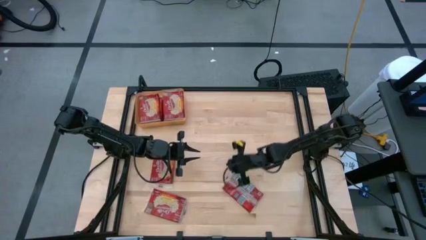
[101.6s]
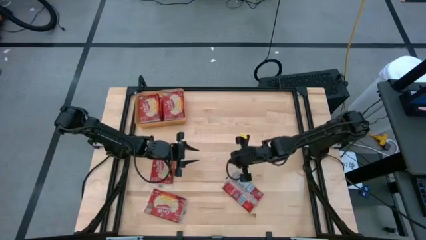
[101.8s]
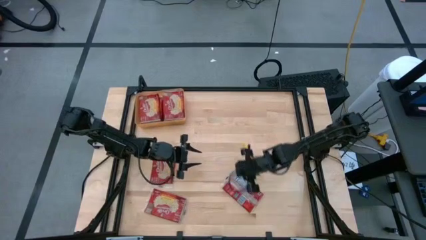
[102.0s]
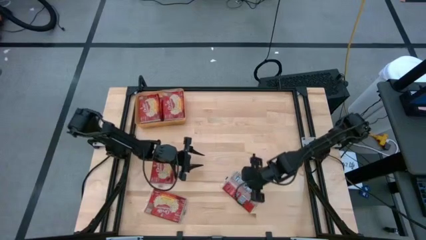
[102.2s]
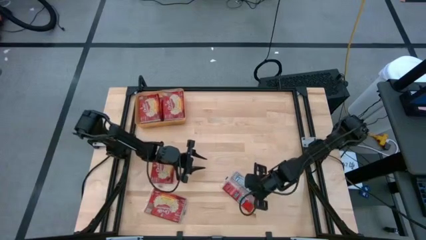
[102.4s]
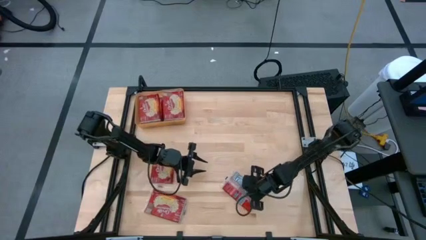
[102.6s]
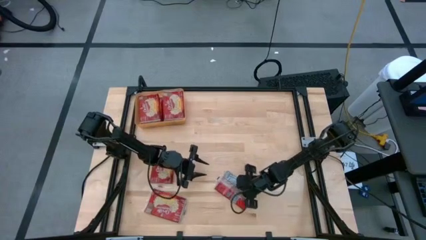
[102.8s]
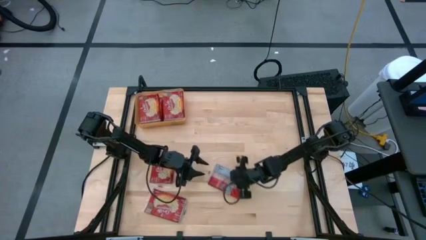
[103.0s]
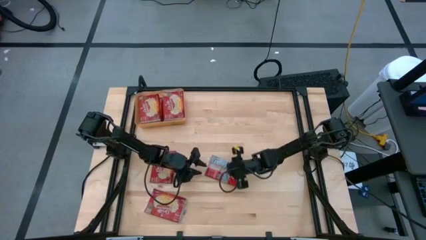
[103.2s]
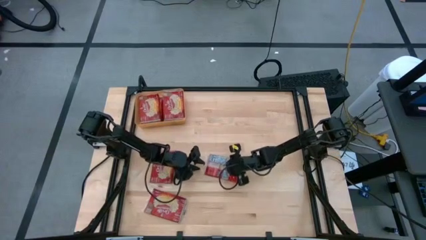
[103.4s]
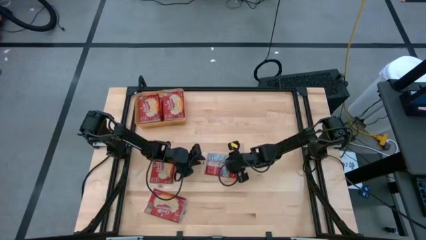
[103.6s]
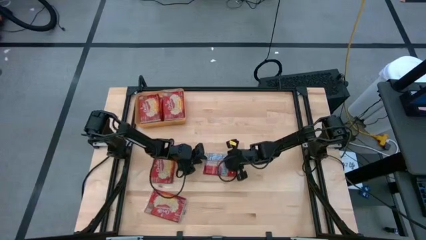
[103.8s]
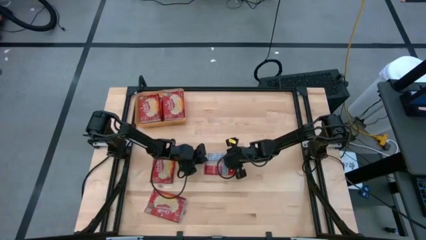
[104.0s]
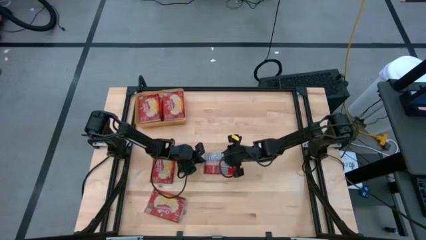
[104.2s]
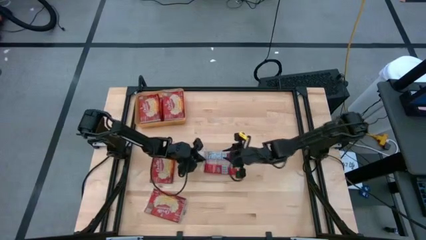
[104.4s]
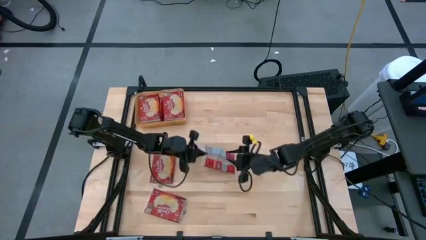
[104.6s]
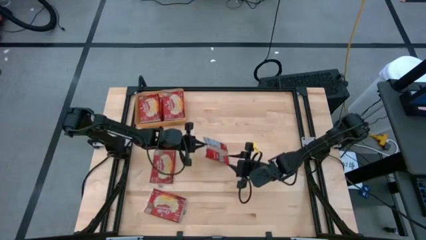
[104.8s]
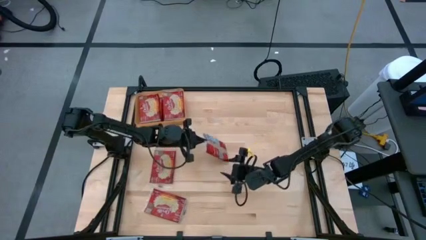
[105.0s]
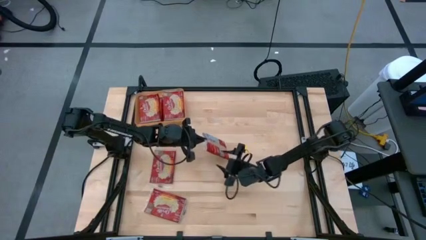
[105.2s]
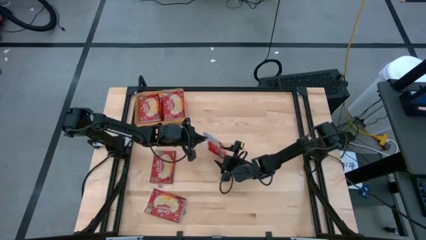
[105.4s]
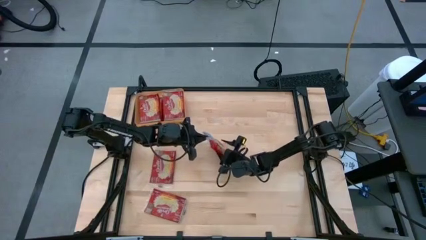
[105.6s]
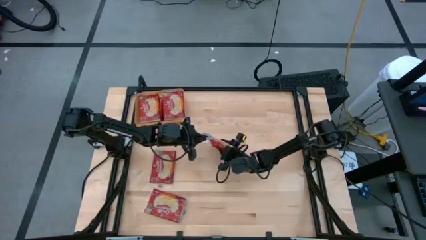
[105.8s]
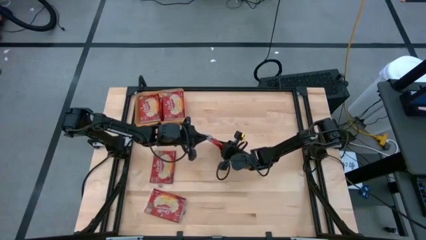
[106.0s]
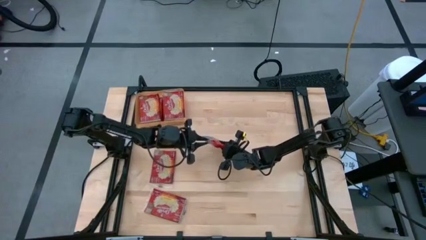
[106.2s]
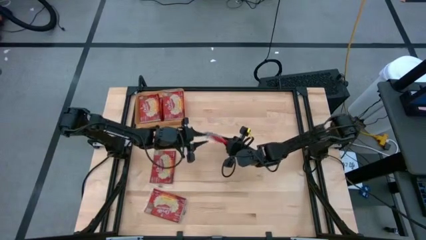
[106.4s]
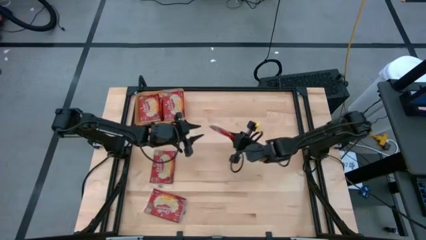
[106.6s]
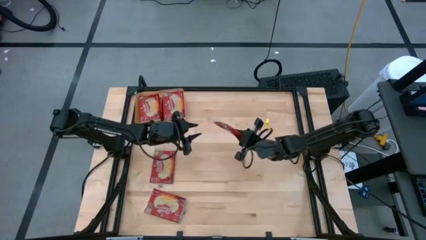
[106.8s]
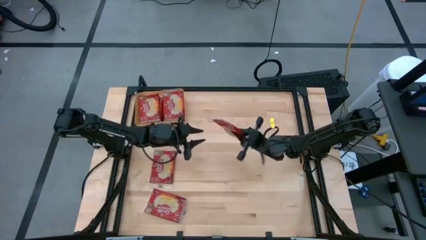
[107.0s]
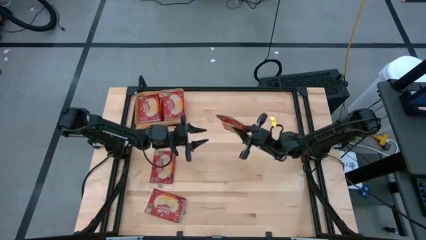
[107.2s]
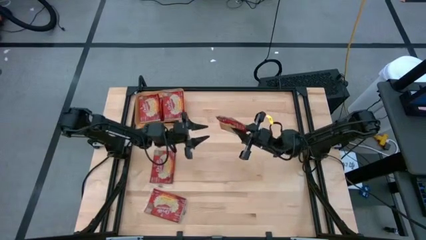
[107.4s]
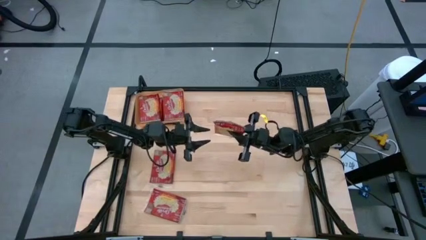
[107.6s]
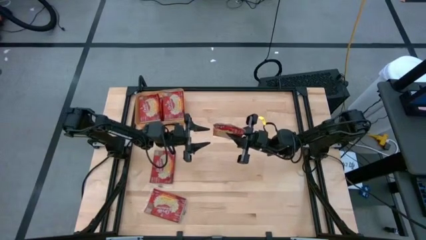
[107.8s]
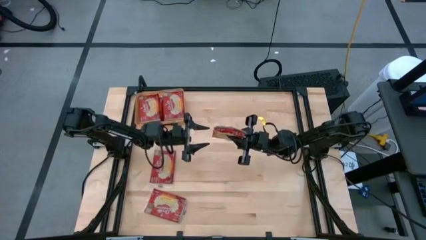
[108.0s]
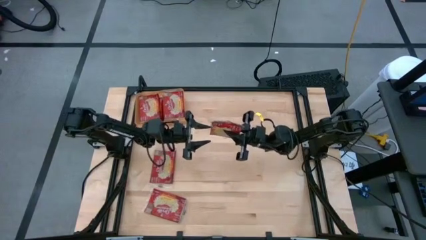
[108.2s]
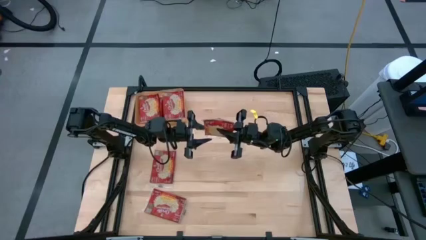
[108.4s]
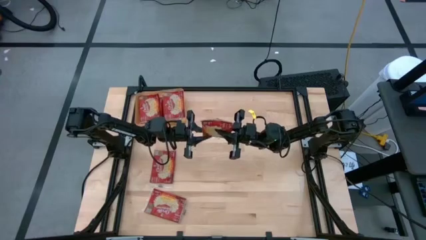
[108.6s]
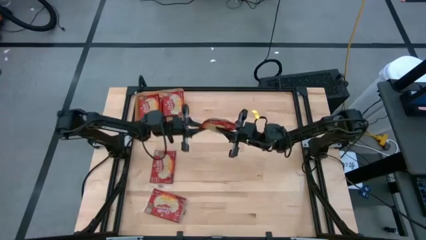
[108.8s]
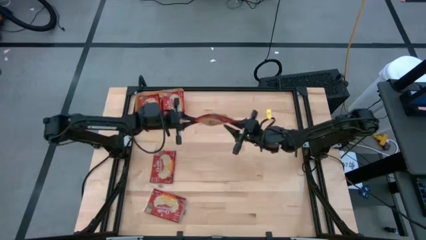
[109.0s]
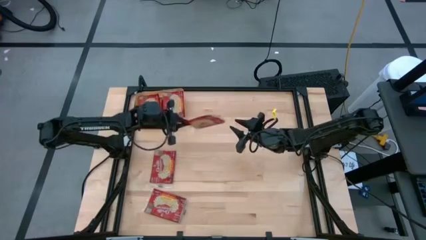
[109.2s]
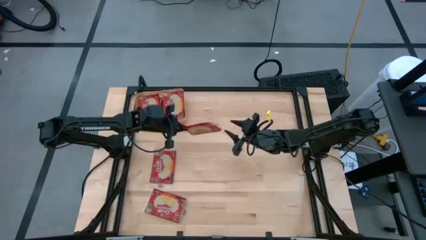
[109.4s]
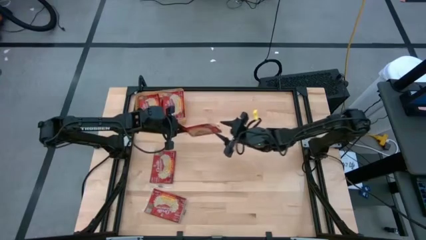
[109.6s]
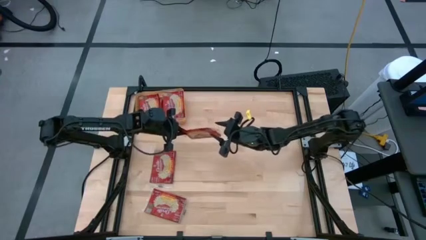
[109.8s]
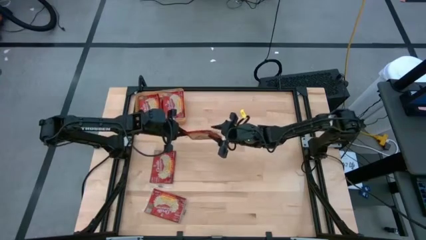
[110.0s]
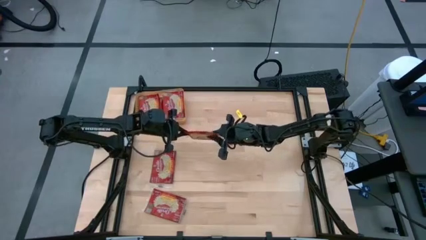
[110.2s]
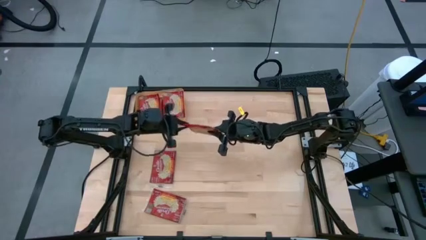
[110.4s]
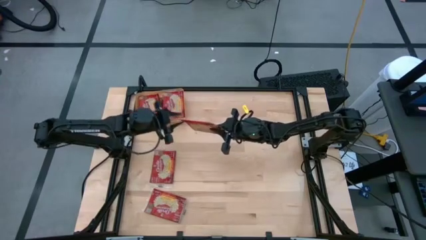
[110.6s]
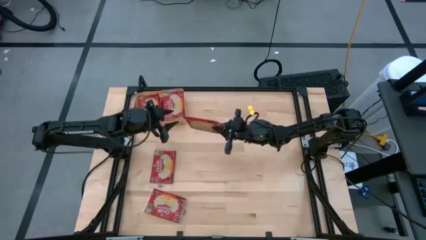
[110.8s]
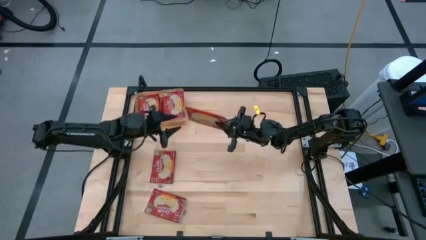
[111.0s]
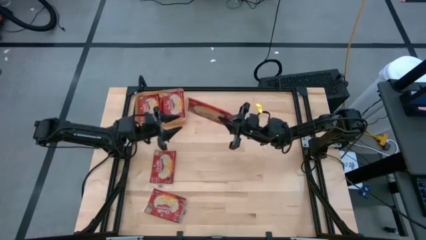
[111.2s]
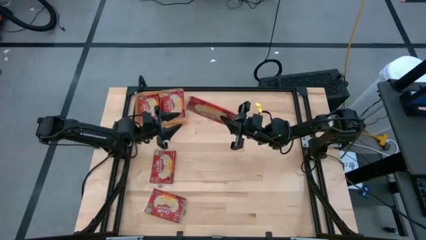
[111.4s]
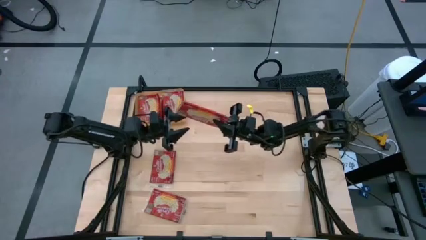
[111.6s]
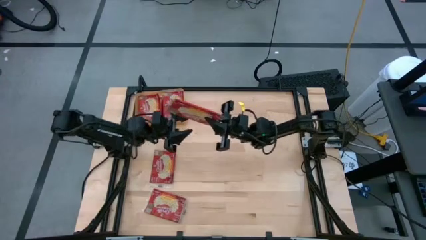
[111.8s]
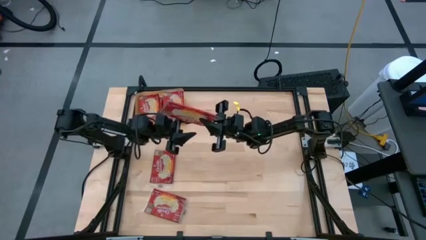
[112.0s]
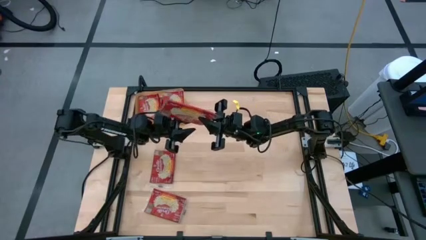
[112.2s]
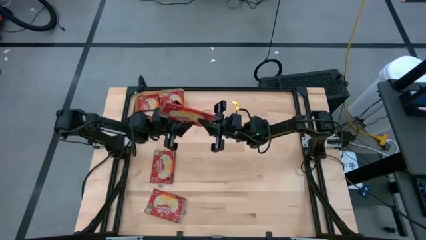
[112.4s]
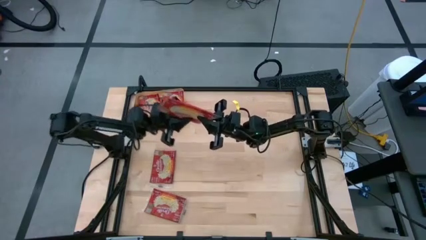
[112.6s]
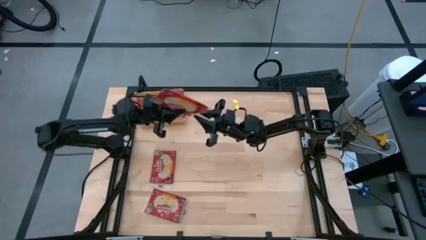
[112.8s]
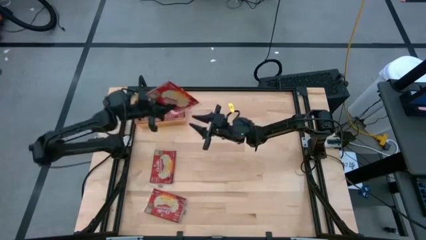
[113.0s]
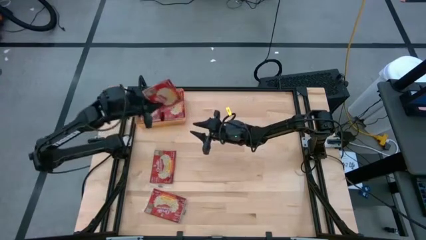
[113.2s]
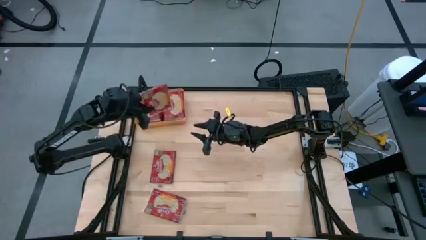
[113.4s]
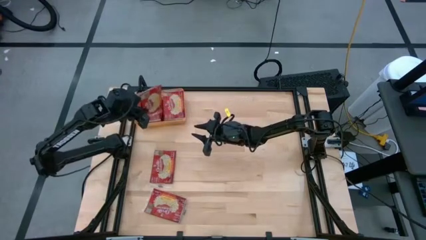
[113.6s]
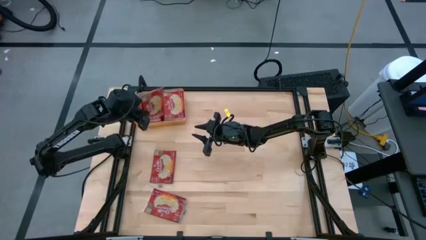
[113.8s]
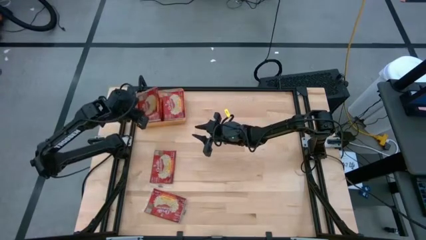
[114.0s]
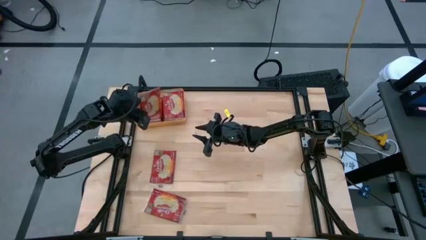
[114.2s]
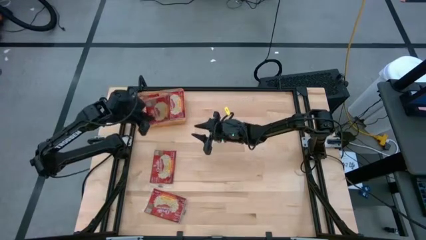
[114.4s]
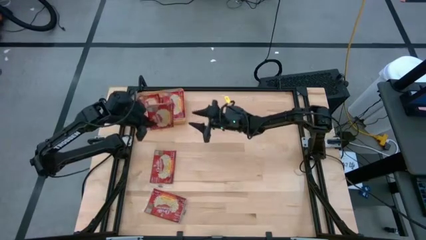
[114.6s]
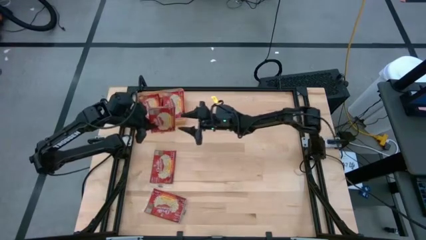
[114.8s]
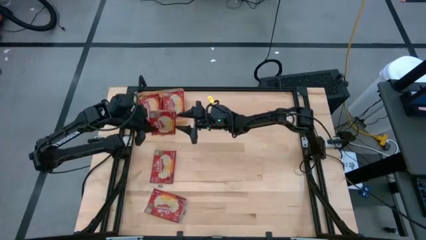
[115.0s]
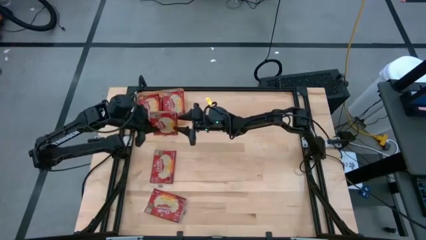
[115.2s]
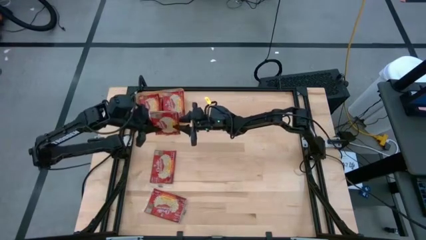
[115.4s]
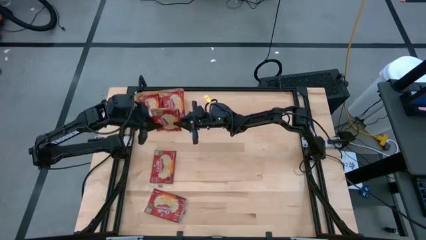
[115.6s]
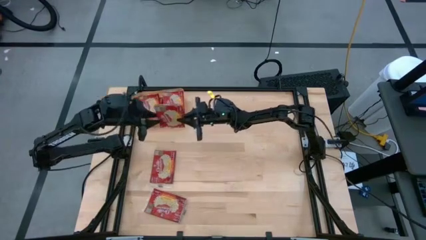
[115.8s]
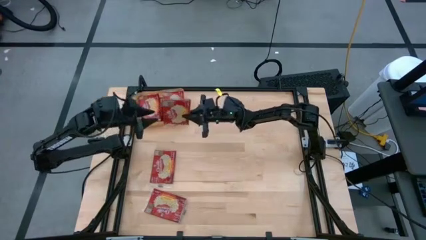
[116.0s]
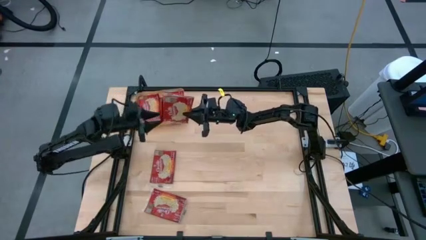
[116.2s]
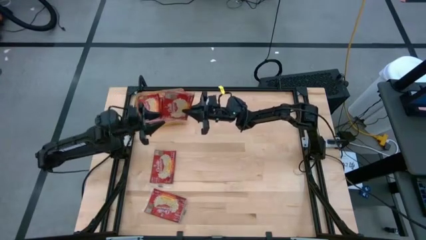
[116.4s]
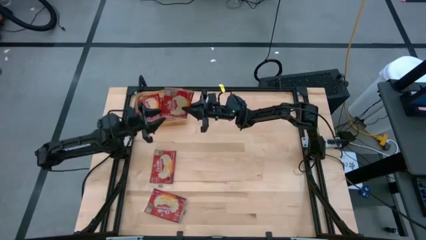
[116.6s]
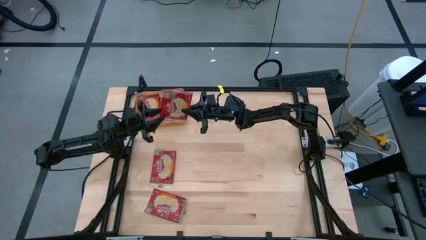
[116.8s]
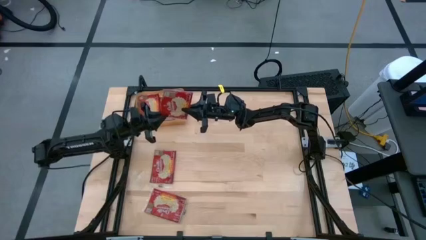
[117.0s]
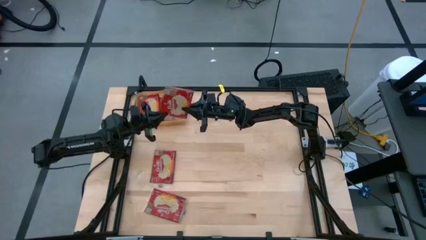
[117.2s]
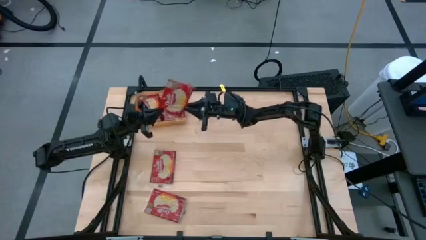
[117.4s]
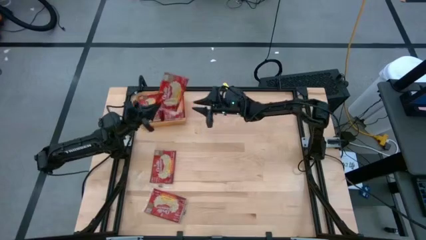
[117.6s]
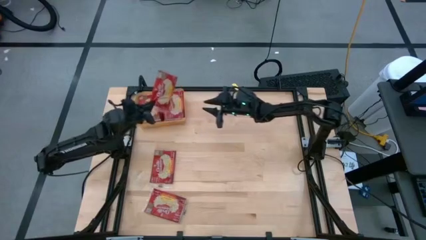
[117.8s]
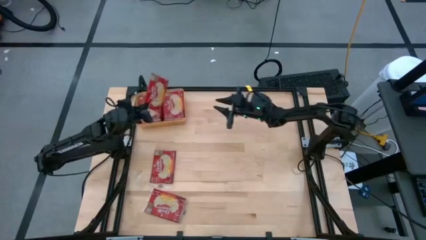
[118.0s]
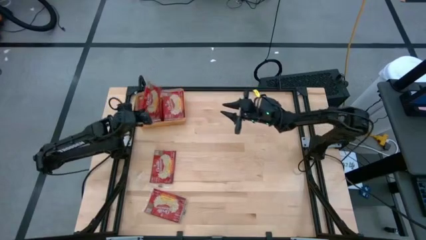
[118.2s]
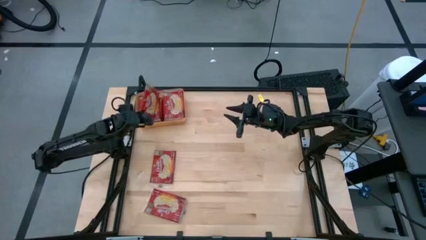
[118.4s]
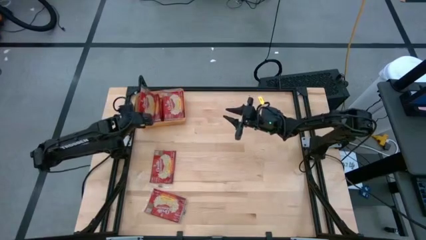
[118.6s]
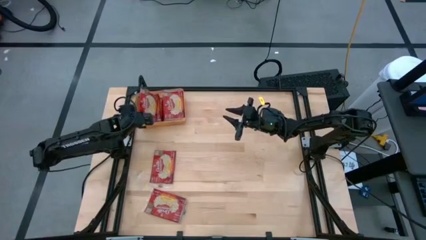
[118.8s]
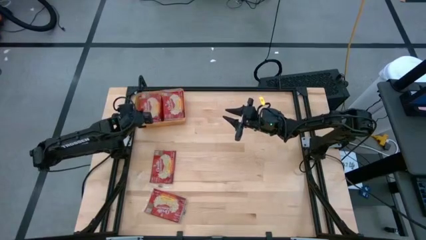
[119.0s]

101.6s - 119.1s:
Task: Sort popcorn bags into baskets
Put the red popcorn bag into the orange bin
